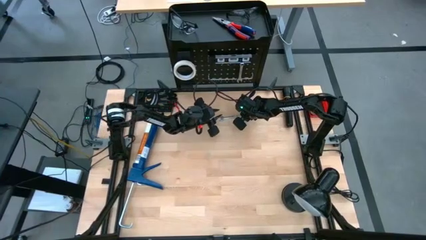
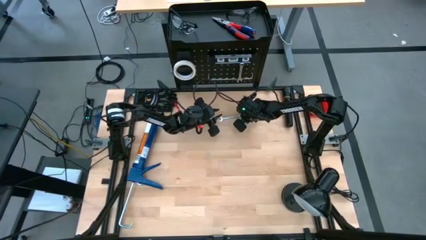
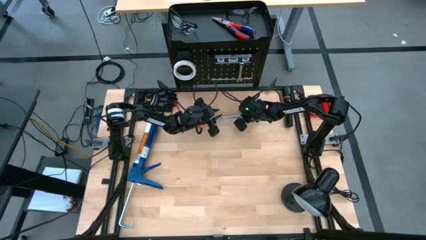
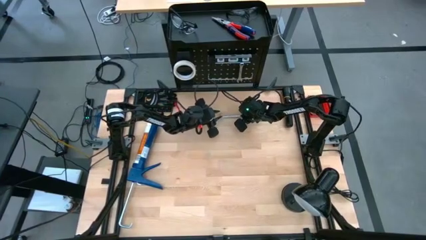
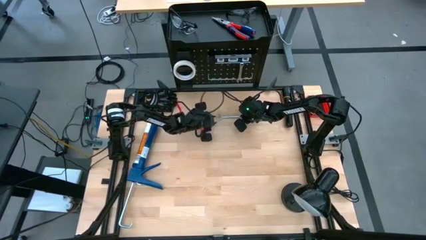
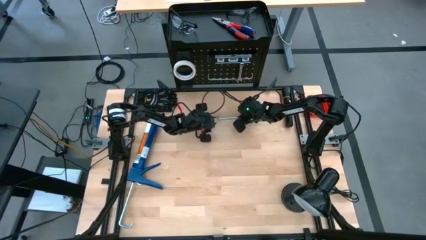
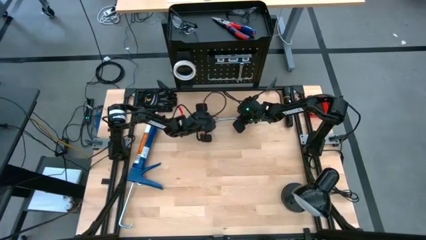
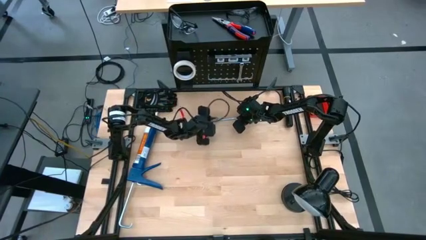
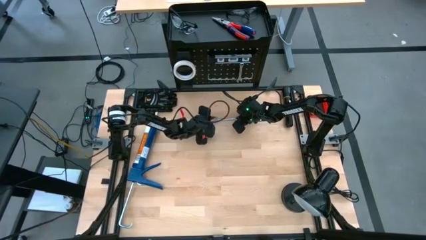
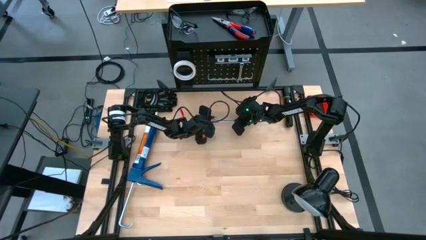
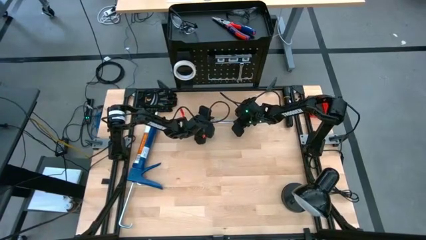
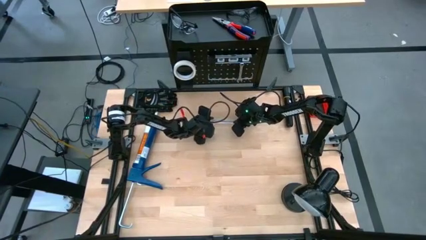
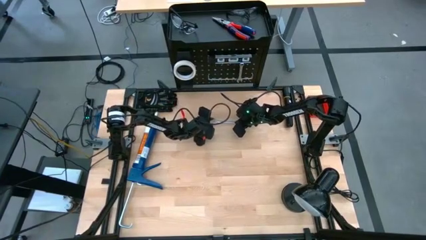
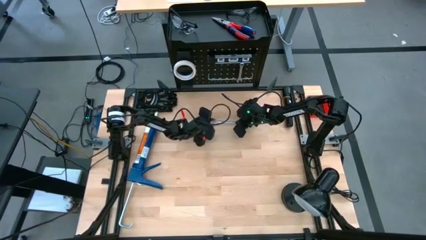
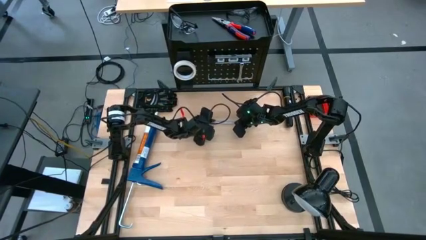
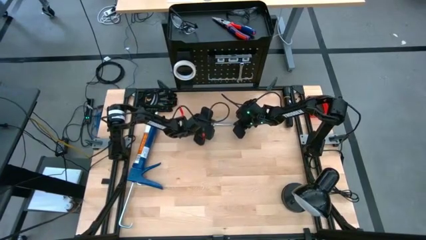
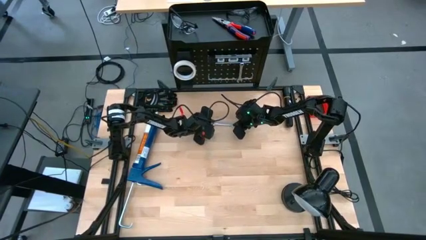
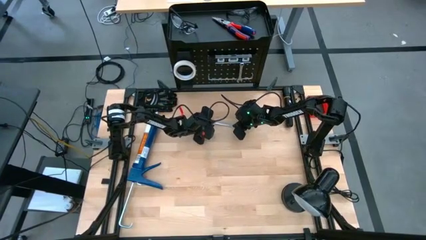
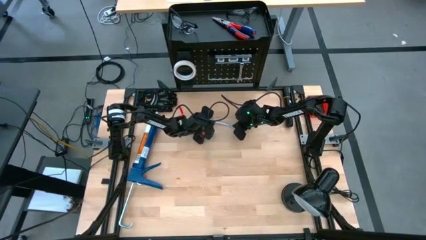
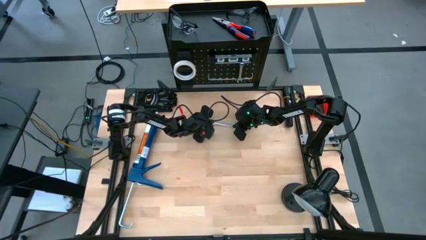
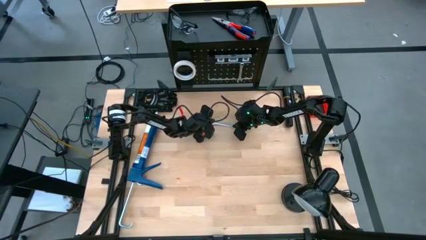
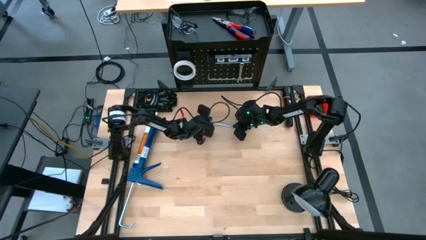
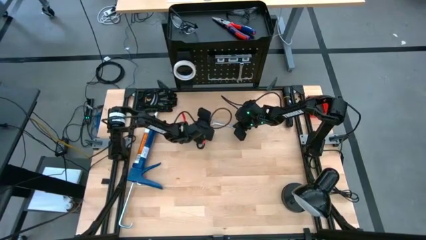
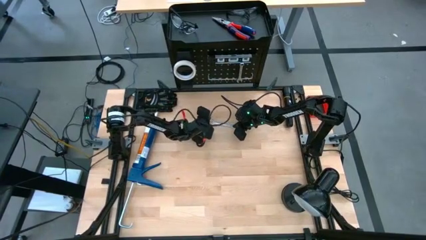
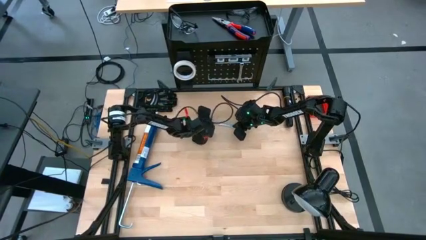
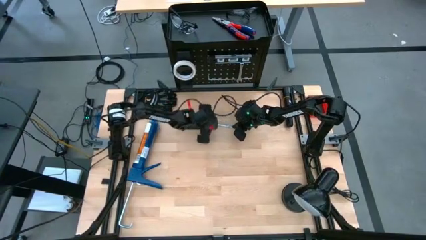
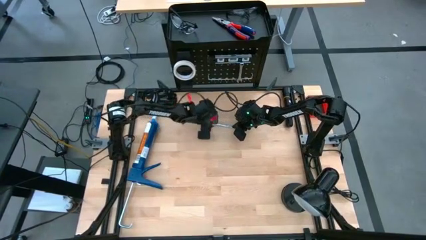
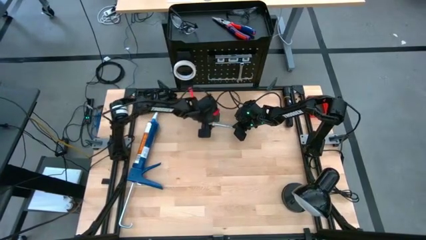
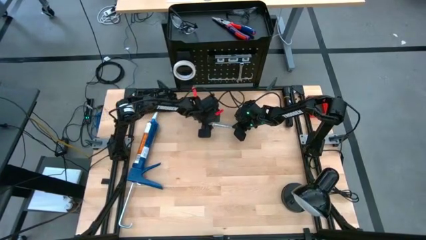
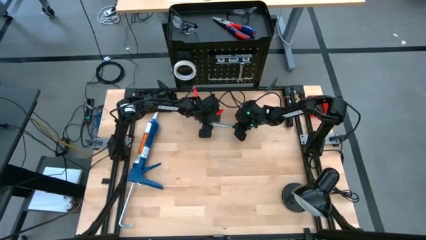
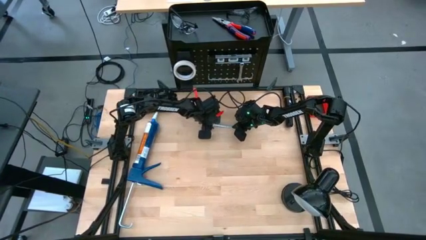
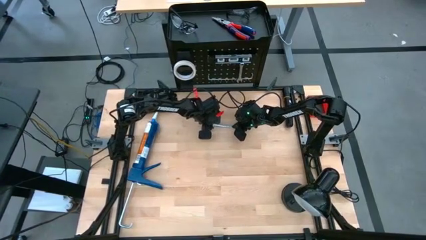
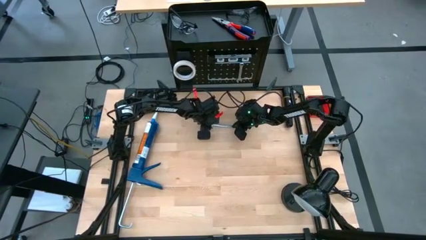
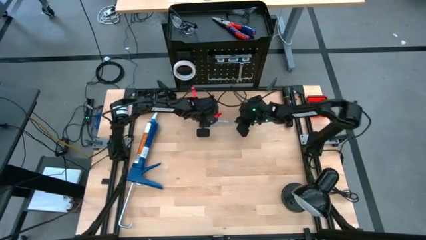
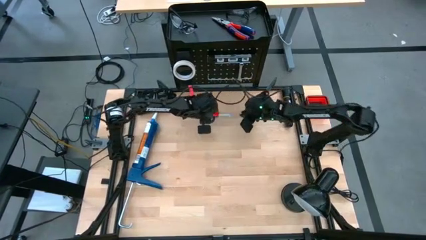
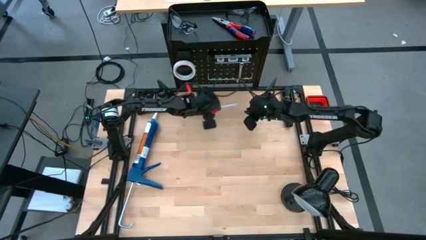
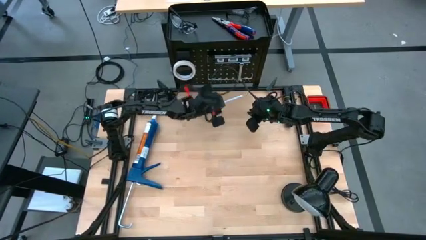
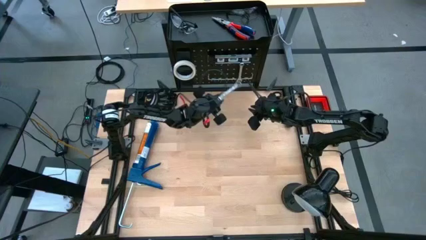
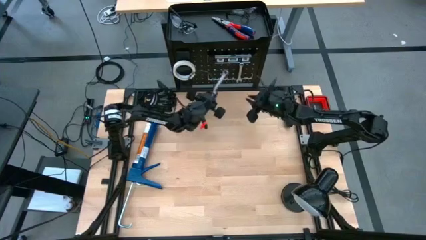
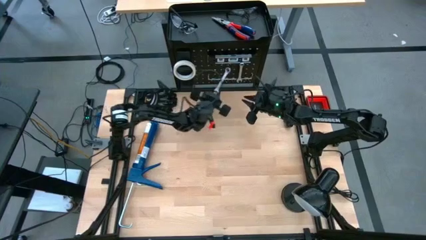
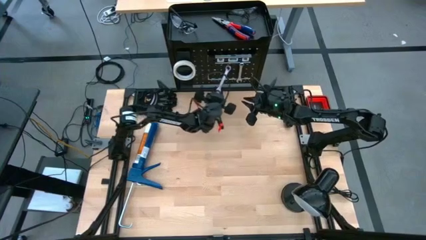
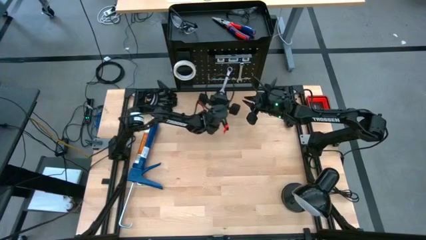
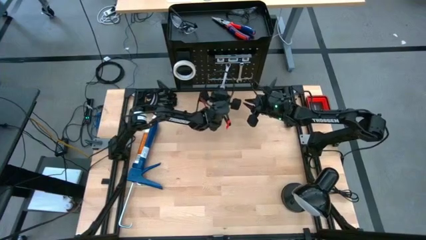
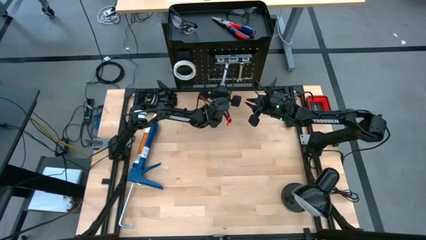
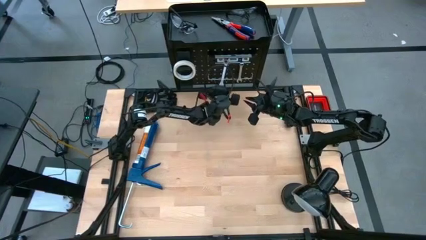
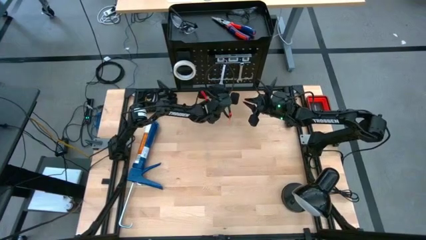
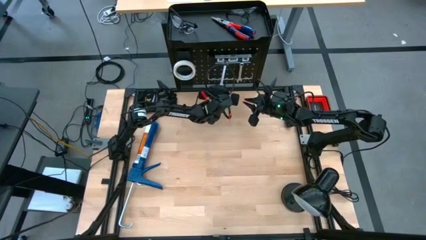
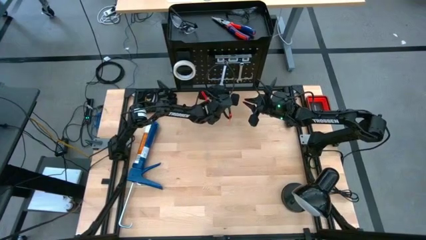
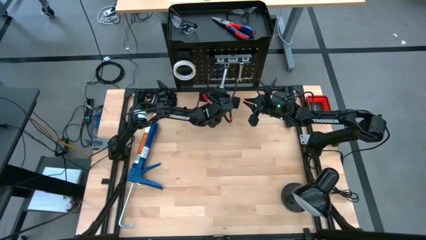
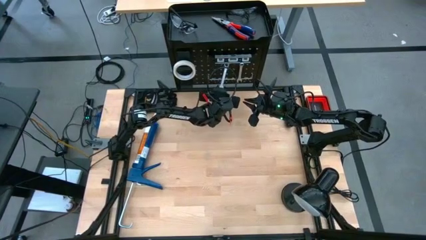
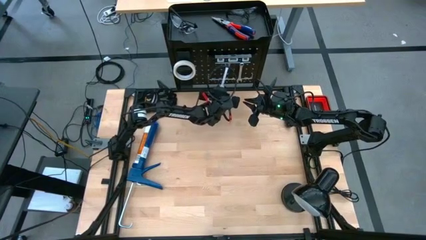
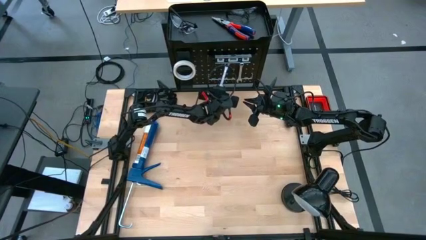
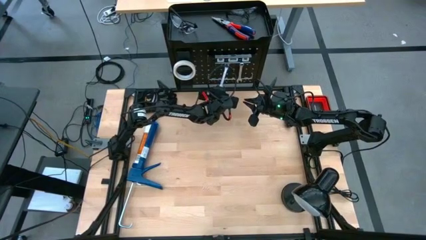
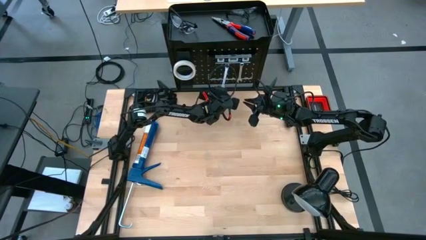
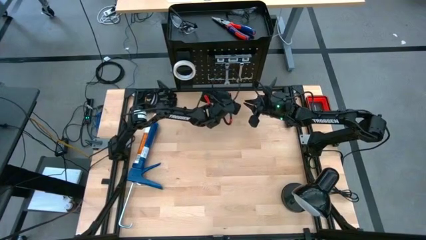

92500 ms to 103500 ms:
Task: Hang tools onto peg board
Hang the wrench on the peg board

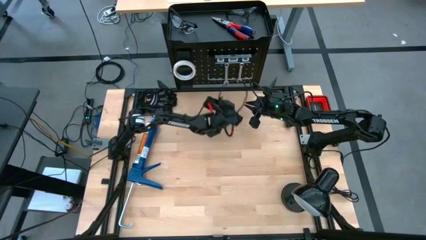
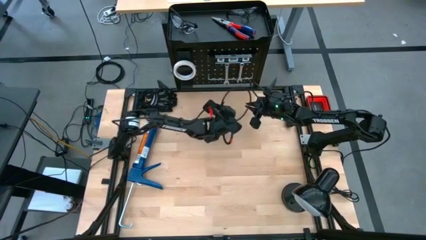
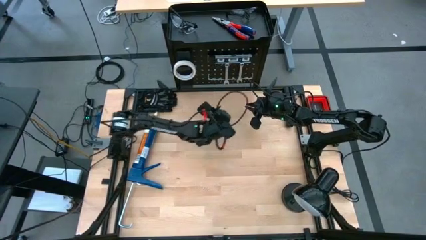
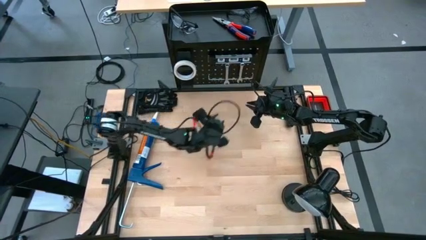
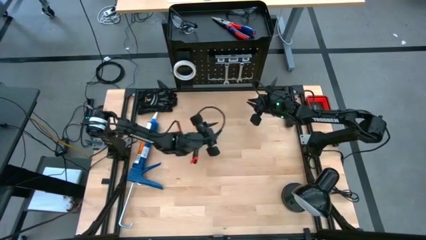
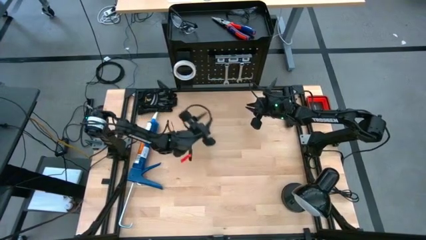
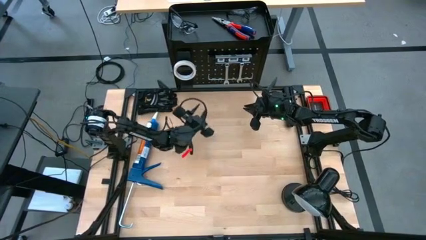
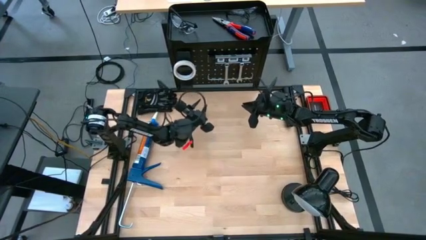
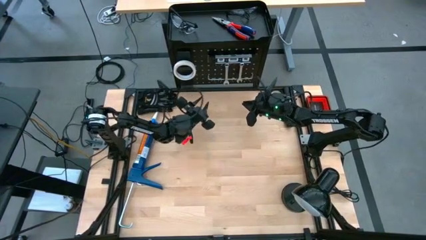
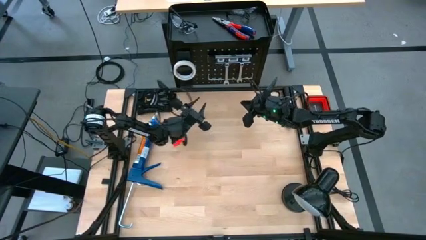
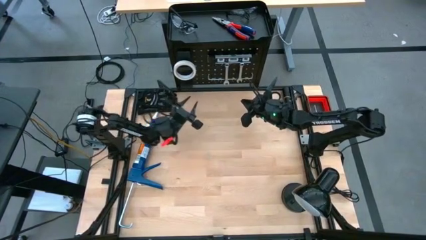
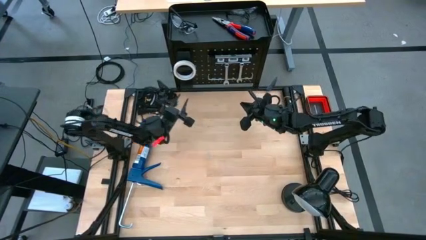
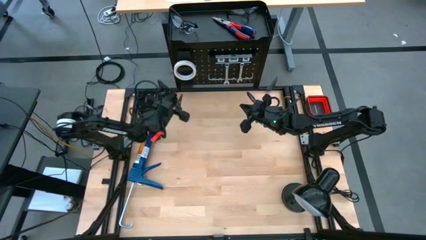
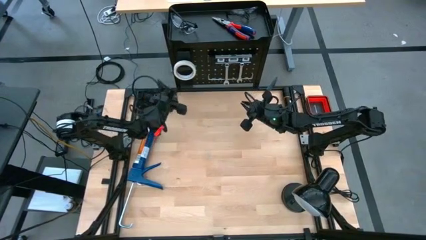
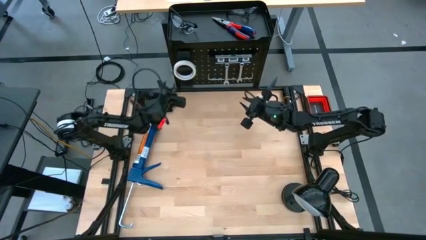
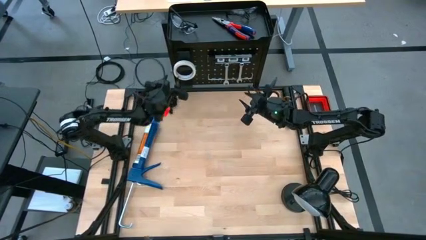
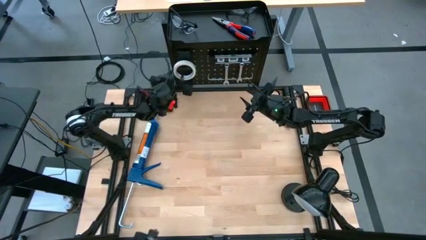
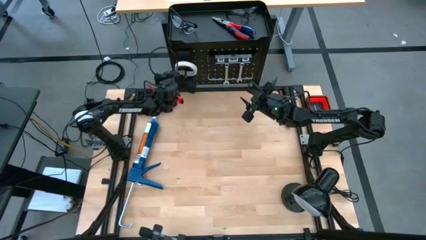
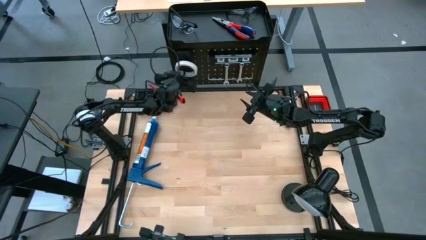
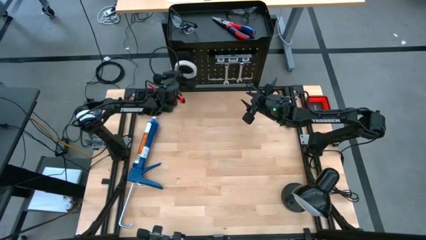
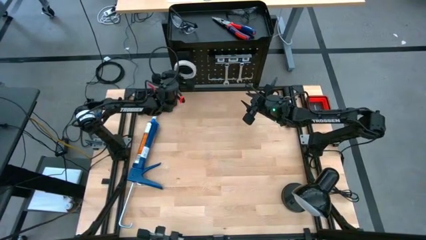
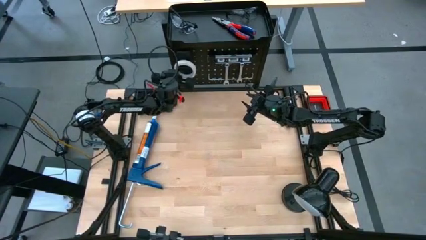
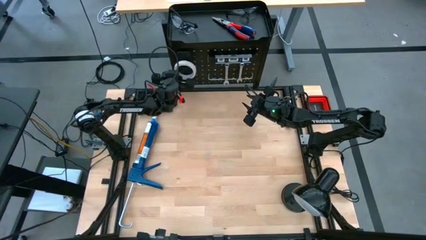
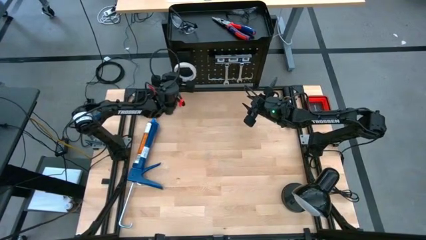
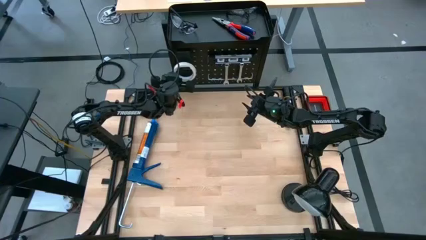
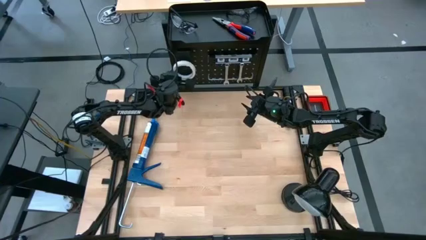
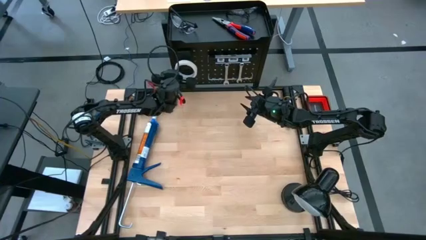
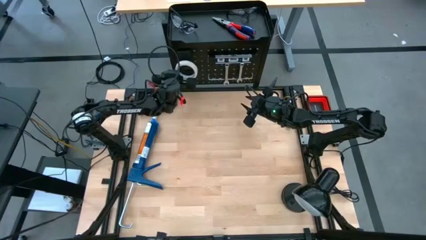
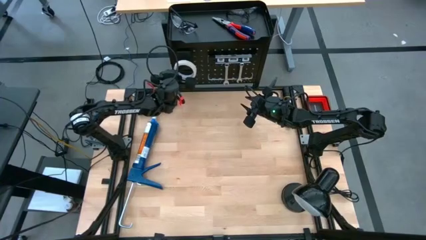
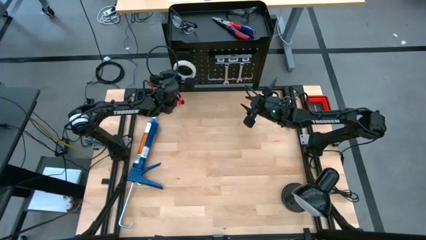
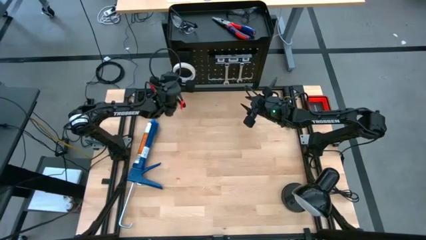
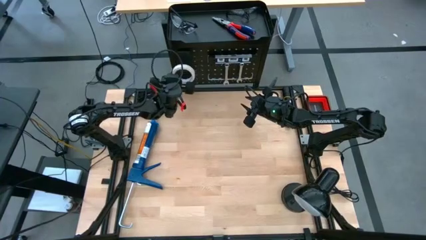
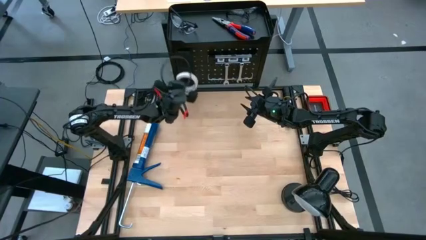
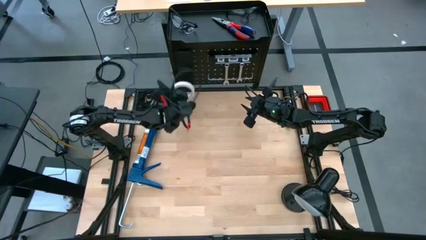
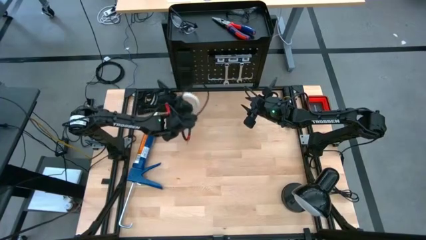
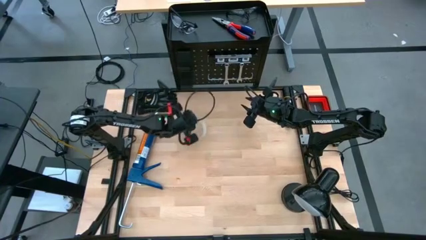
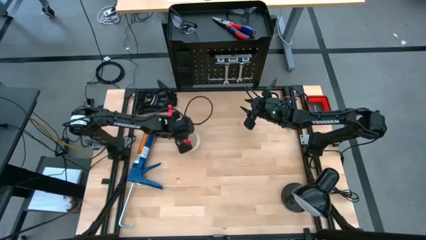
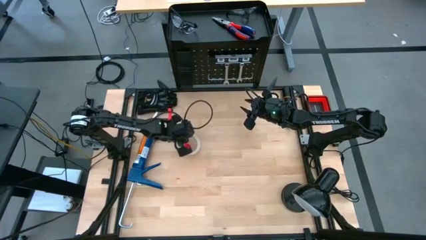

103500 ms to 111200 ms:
Unhang the tape from the peg board
